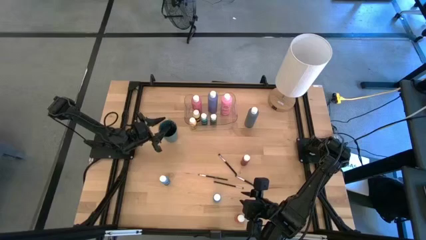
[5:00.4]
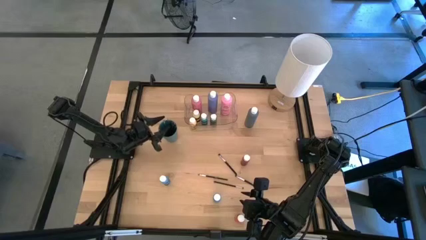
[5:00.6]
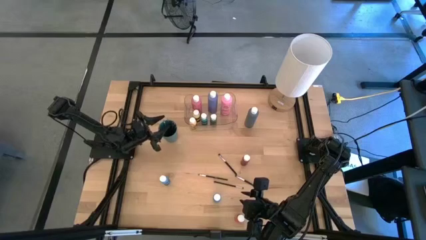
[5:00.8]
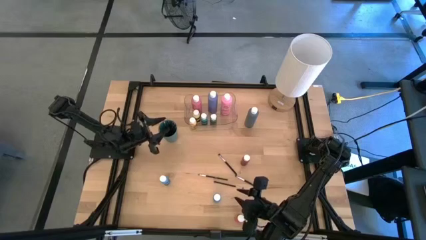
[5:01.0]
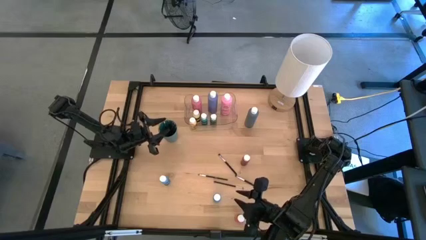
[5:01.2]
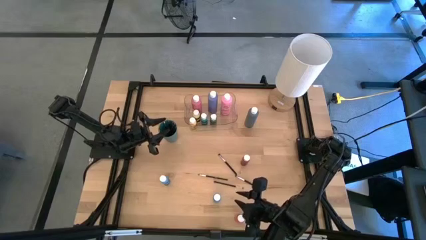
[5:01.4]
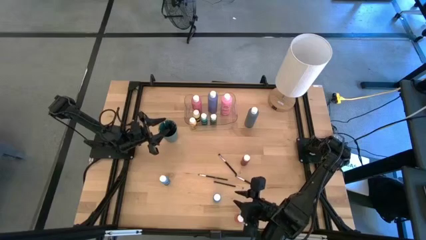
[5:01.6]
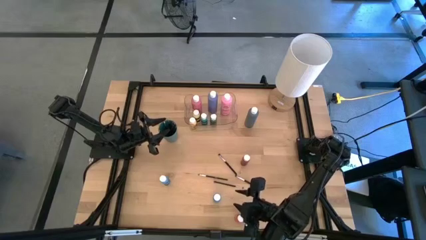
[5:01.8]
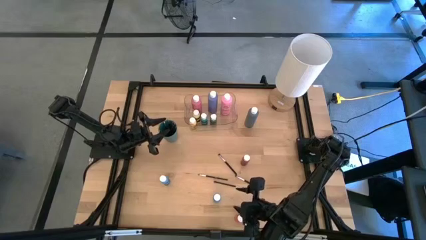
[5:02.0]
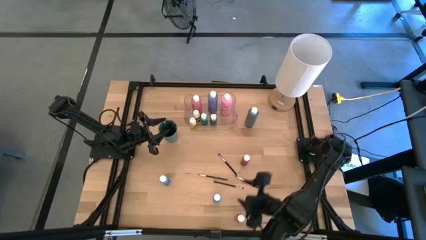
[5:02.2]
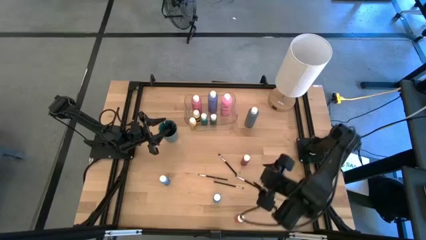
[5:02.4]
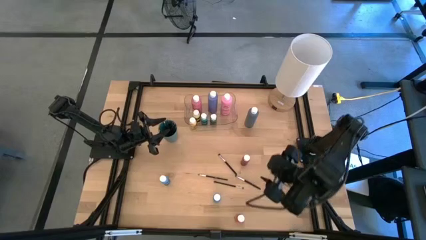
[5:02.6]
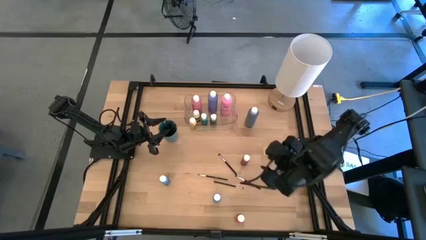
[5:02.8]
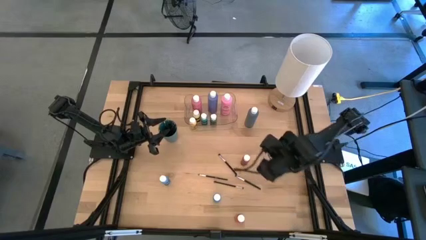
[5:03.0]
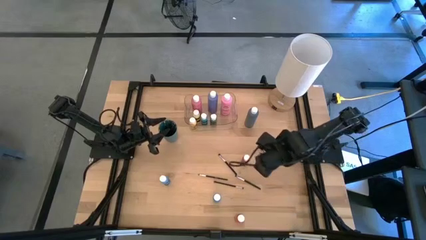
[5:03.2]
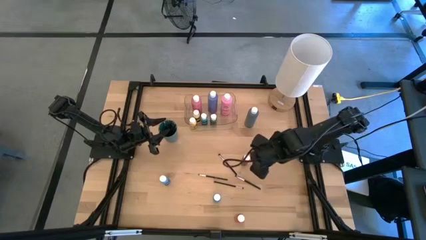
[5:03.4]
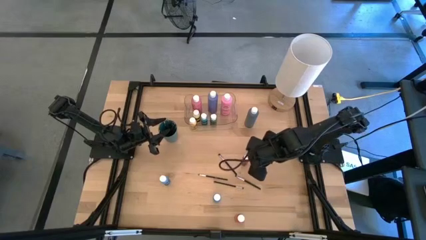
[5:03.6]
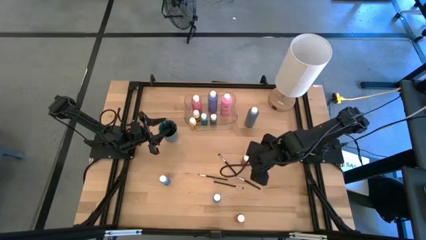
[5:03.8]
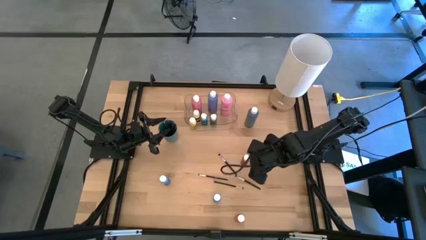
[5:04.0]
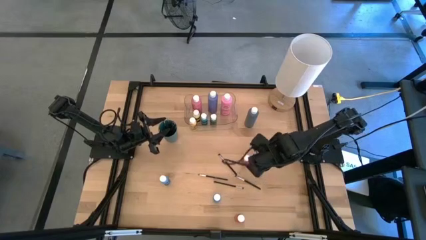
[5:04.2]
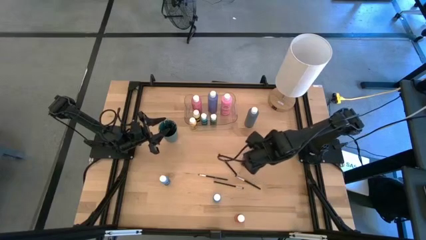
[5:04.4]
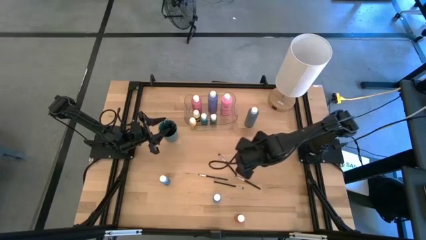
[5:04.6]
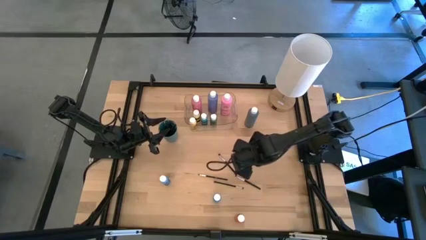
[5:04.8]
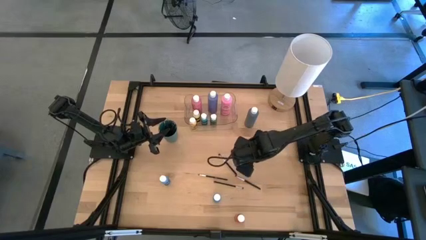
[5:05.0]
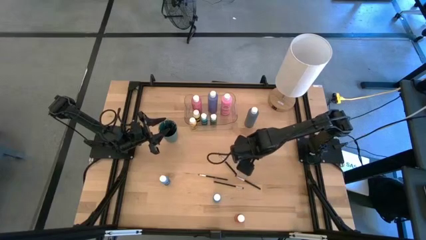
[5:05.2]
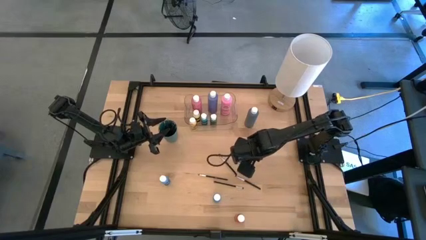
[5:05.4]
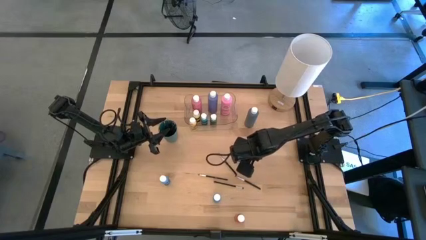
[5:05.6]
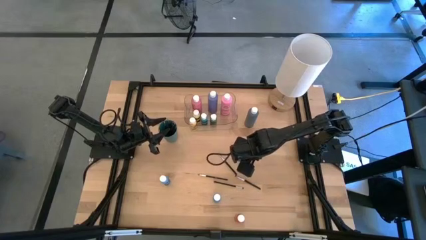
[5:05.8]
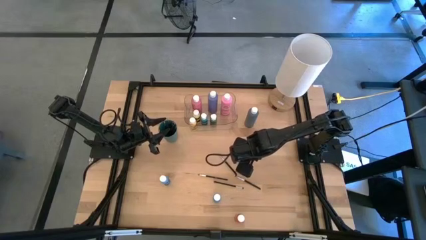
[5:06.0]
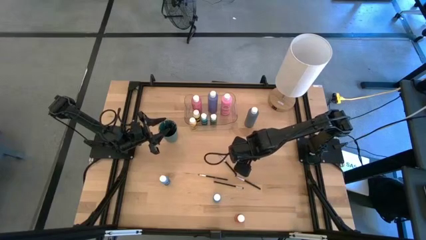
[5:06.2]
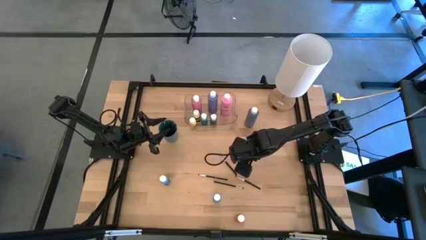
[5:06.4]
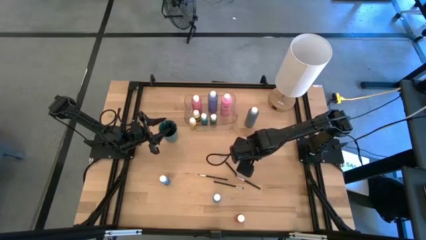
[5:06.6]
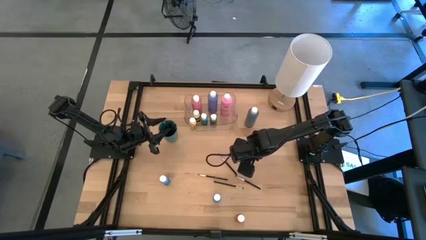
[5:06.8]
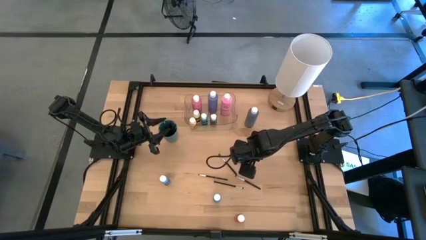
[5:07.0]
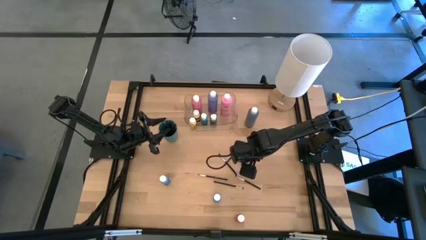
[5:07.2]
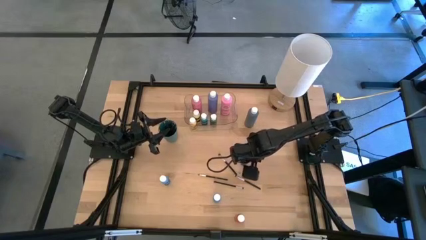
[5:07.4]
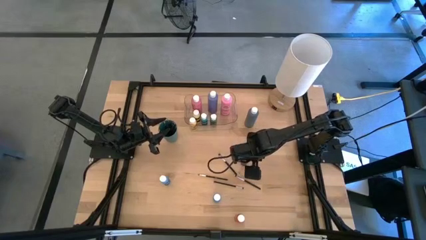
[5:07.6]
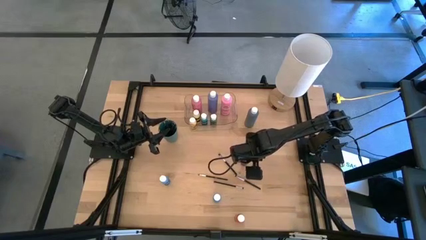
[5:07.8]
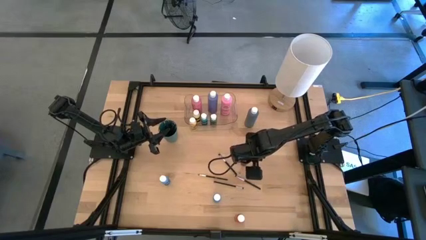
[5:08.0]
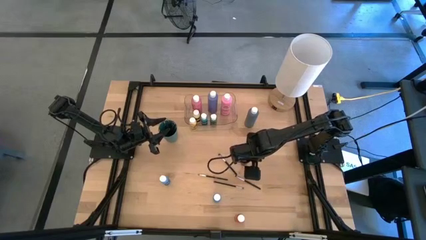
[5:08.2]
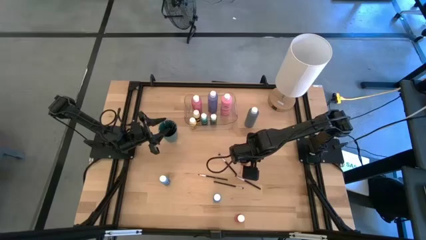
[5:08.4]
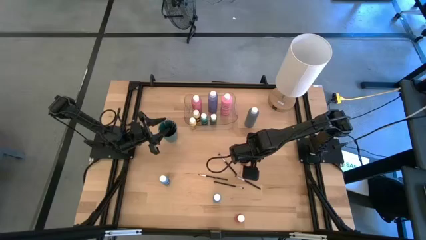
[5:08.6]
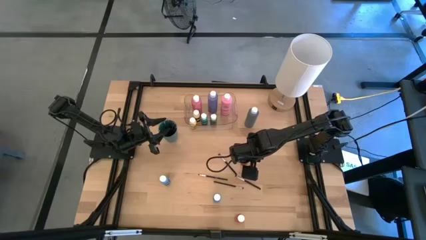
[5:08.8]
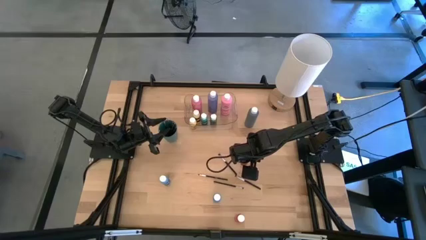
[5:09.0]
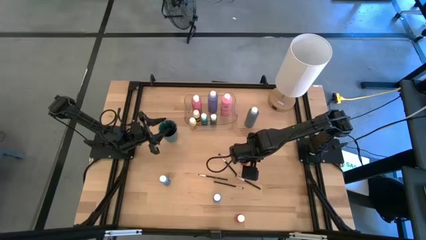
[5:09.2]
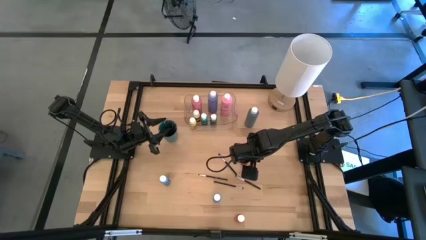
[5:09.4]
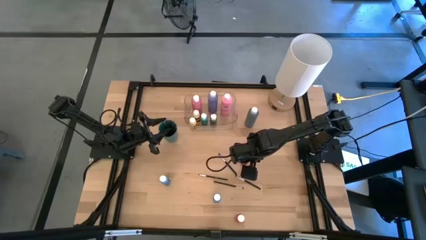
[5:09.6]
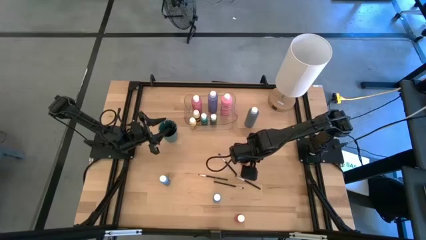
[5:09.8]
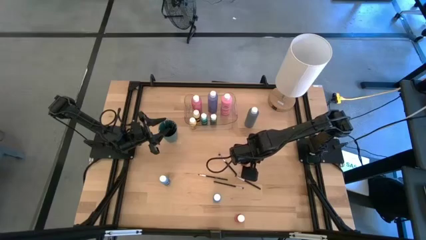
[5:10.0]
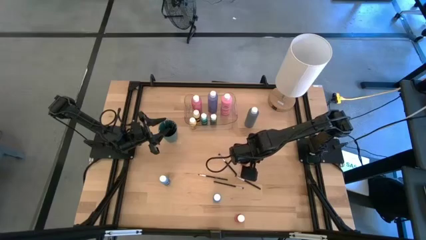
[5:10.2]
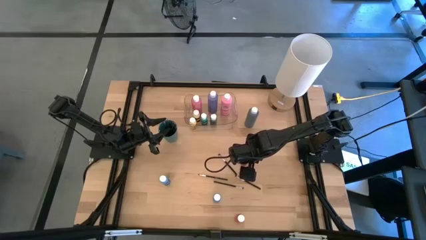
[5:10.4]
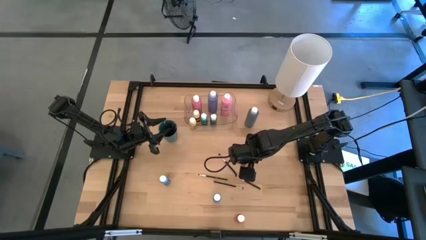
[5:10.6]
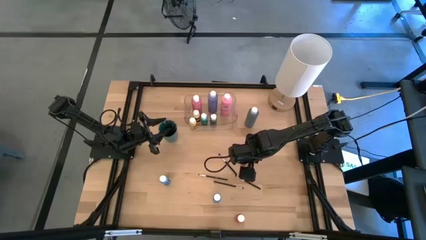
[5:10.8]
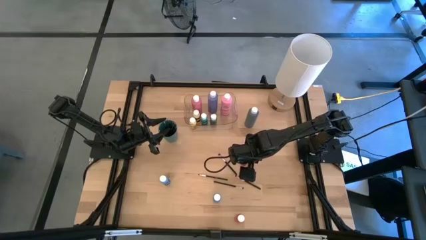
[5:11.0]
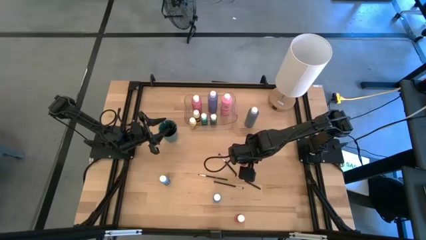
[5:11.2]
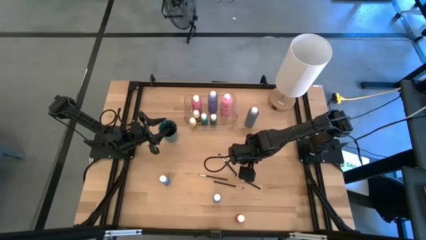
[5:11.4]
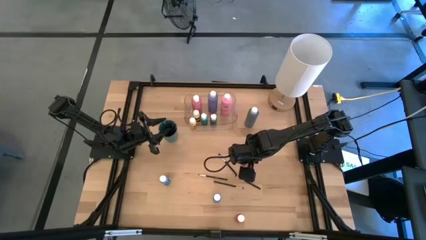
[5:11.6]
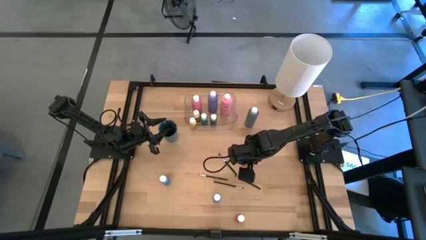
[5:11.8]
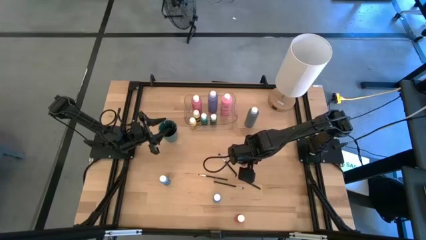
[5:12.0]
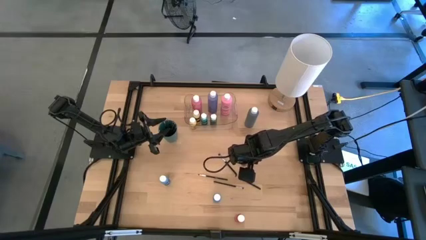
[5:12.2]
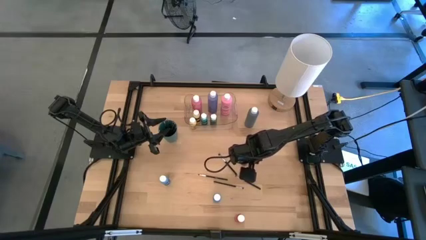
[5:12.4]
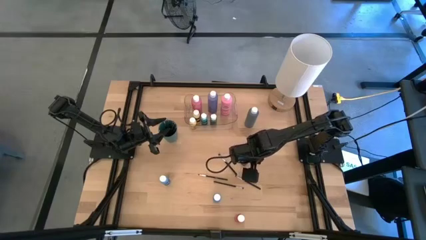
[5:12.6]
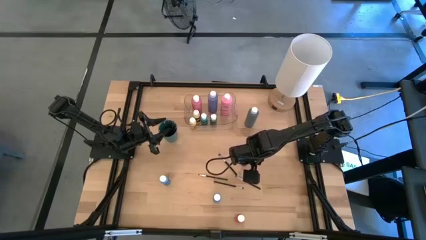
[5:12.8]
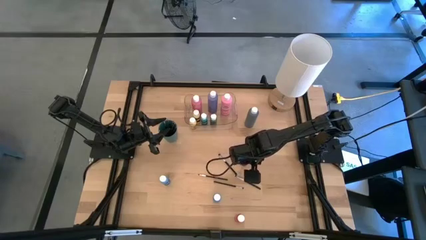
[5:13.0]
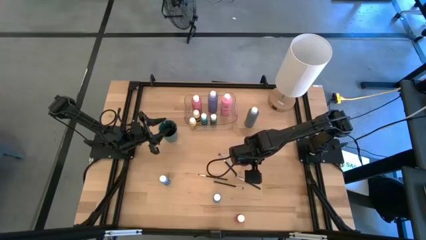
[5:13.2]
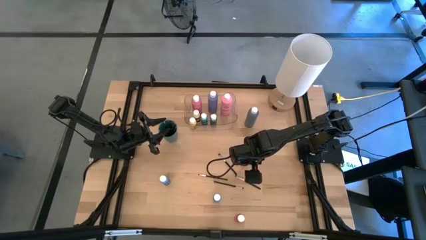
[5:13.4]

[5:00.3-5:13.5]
Task: Pick & Place Paint Supplies
Put the red paint bottle into the transparent bin

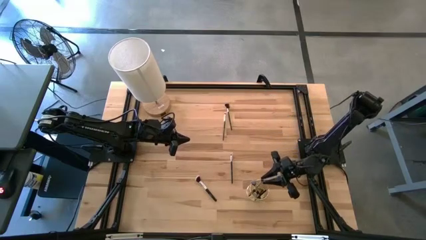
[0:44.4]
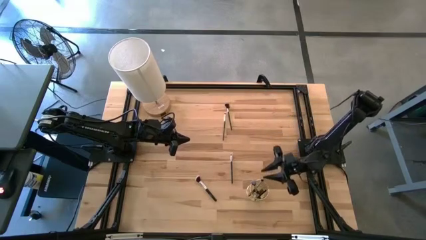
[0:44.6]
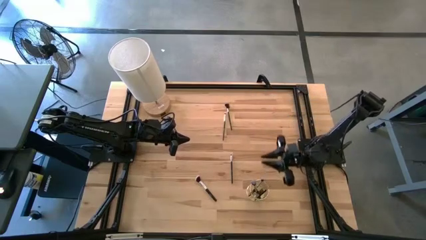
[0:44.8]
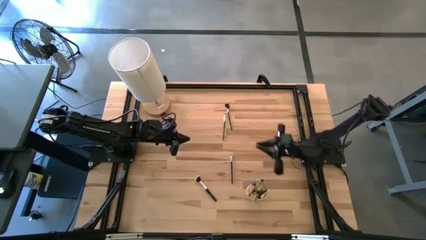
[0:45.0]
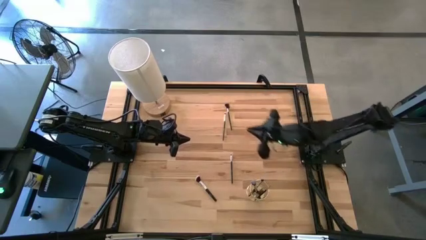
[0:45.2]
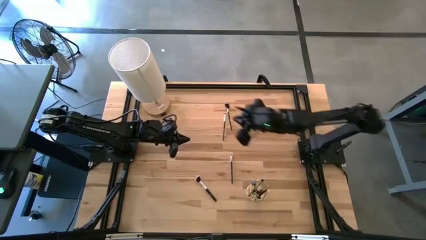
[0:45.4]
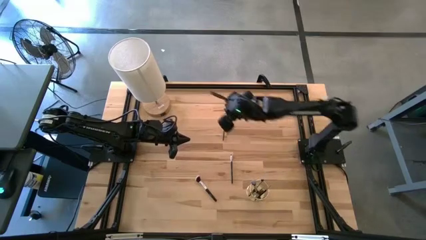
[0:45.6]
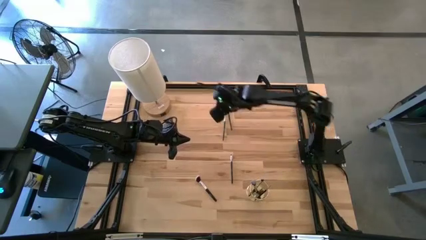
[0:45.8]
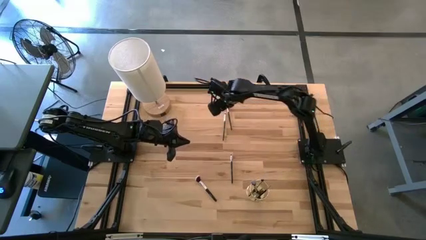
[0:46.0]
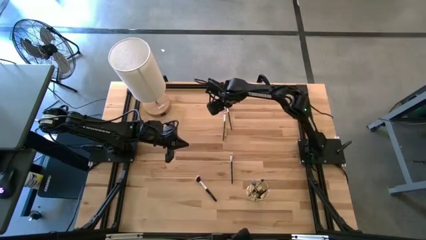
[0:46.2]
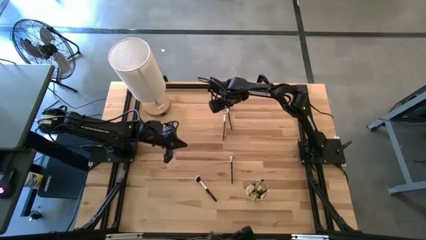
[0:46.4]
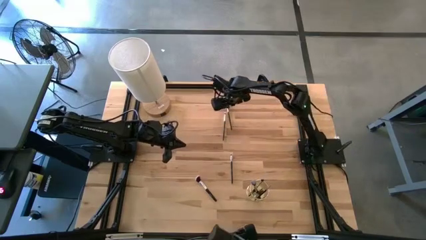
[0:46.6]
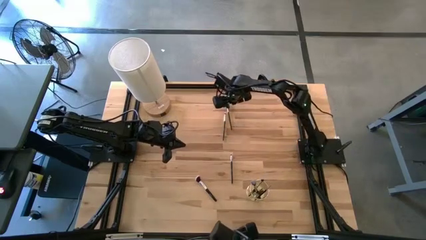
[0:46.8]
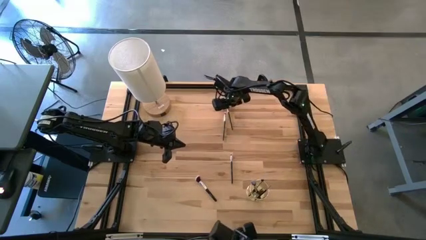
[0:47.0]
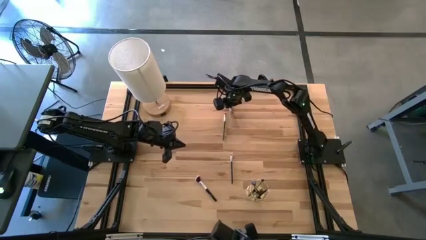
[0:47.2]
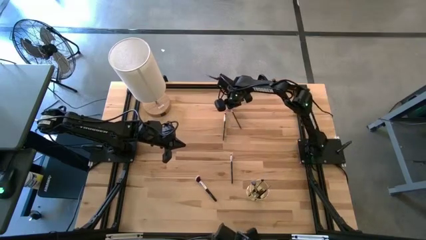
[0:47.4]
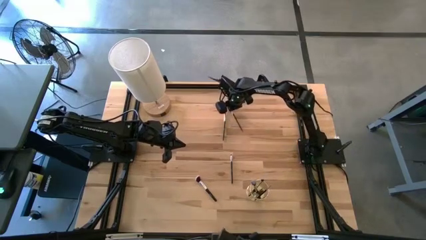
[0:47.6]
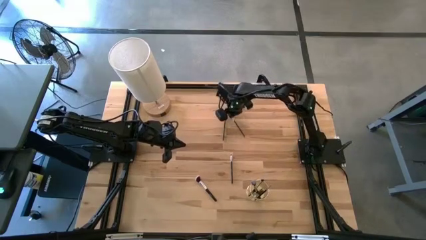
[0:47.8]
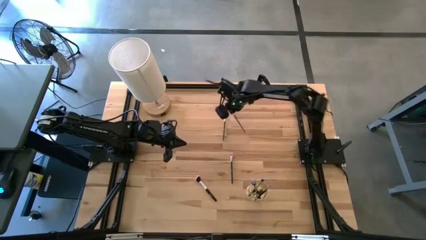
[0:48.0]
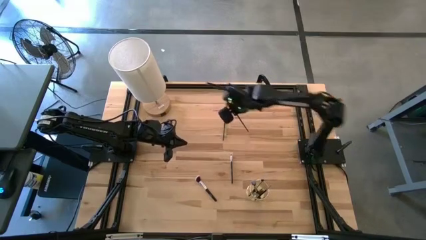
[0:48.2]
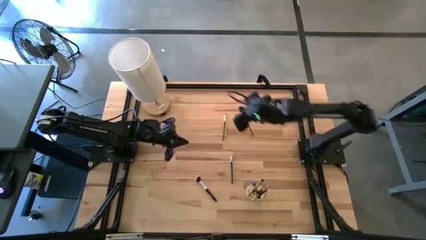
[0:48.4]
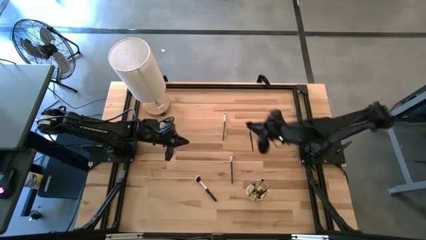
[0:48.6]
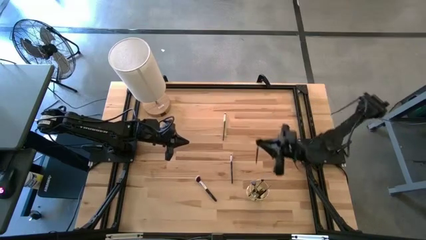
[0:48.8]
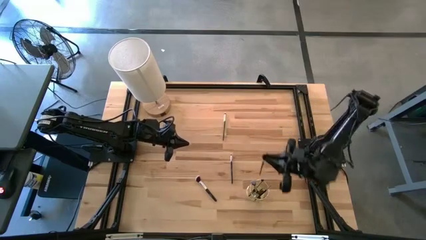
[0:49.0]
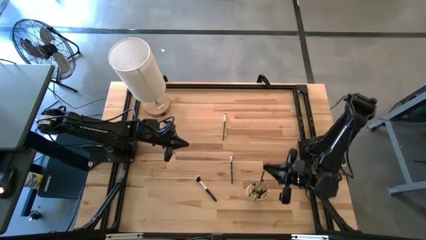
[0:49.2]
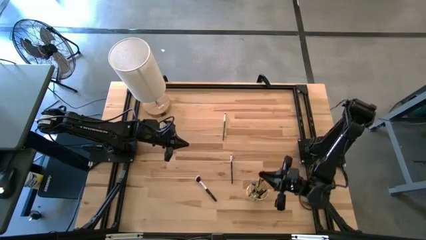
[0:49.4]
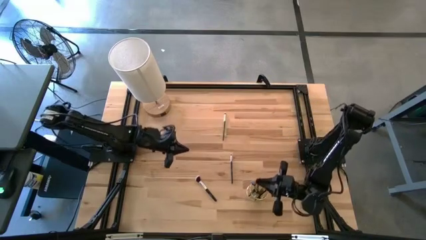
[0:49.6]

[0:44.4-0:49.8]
Task: Pick & Place Makeup Brushes
Put the brow brush into the makeup holder
